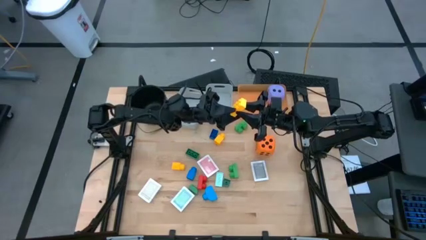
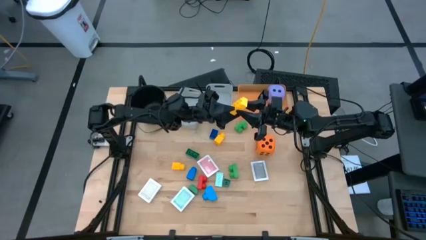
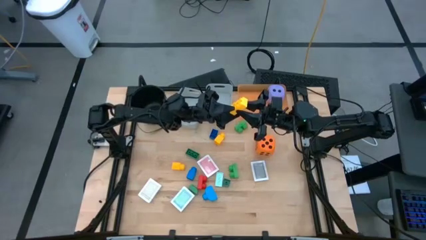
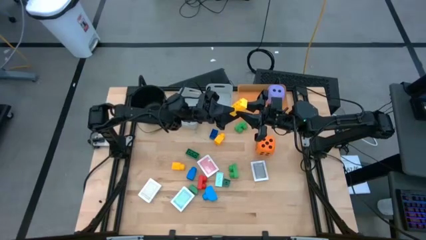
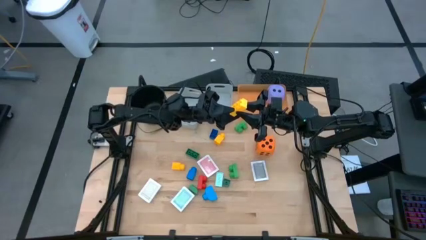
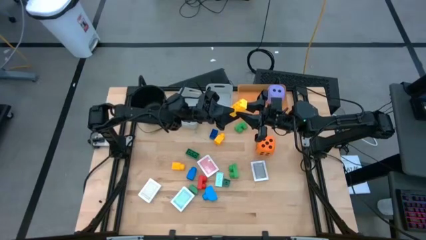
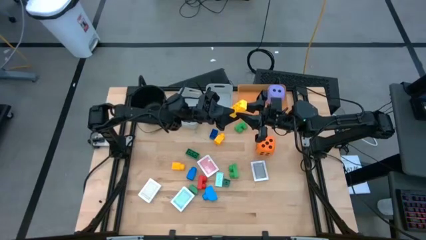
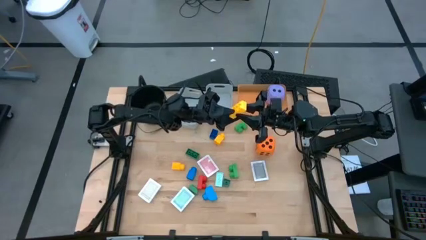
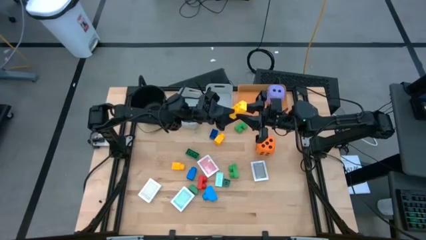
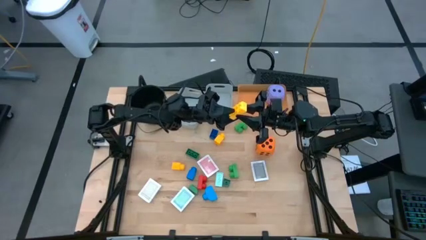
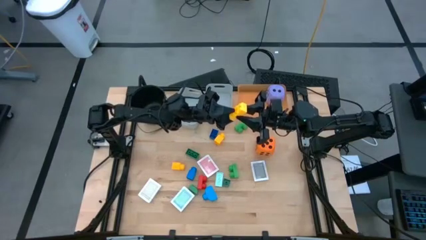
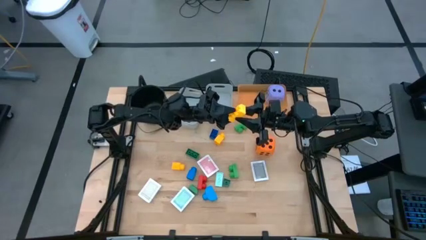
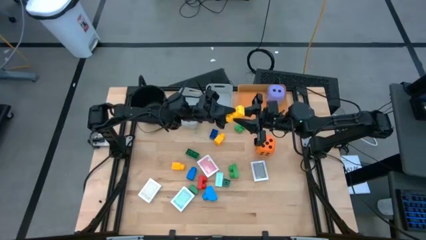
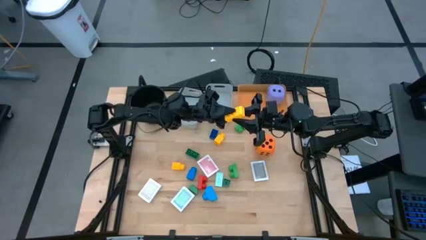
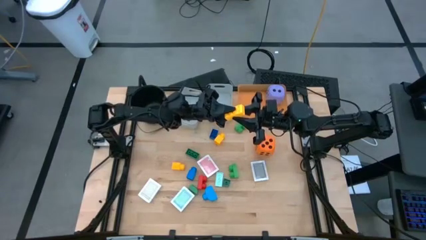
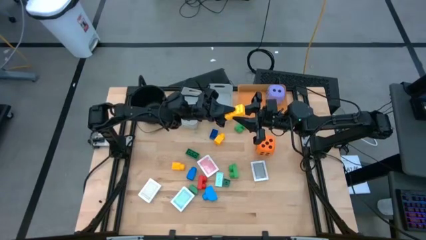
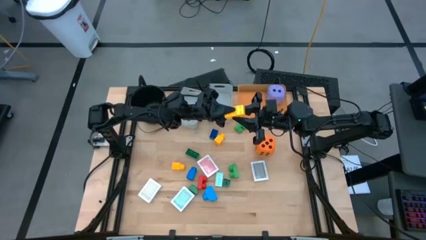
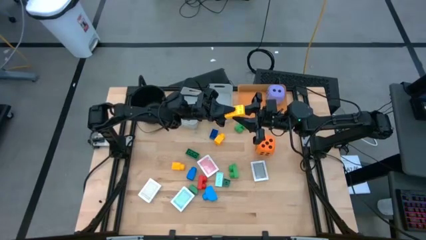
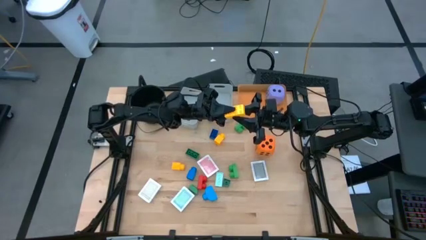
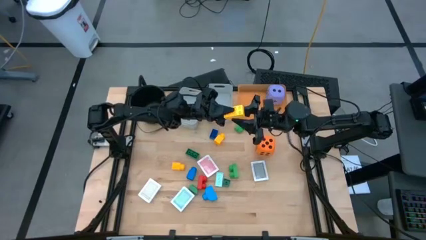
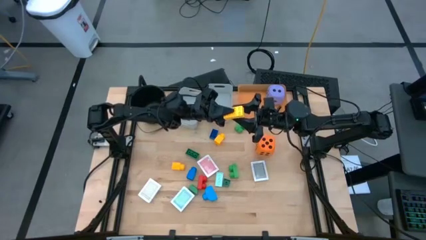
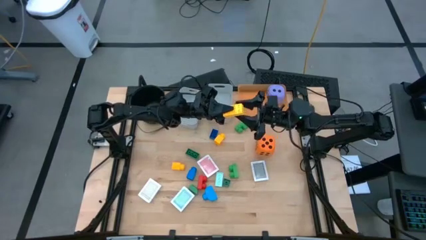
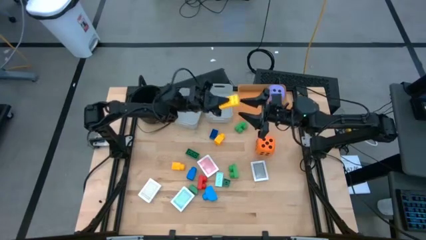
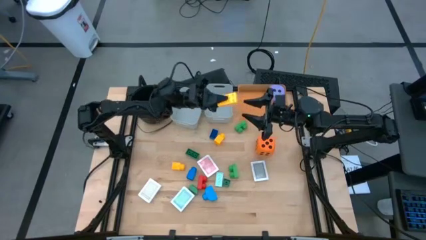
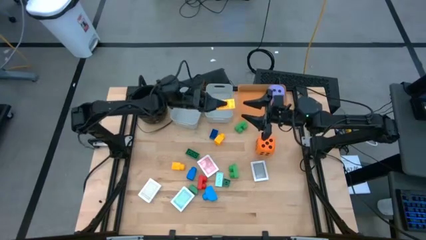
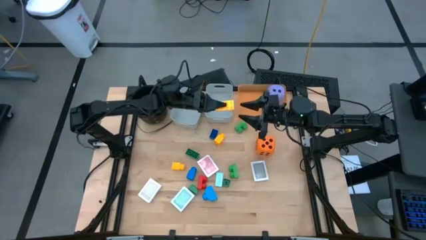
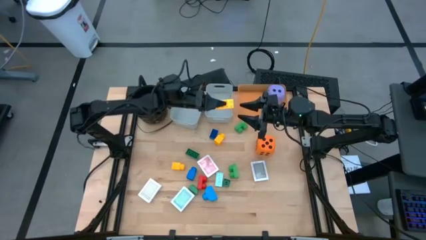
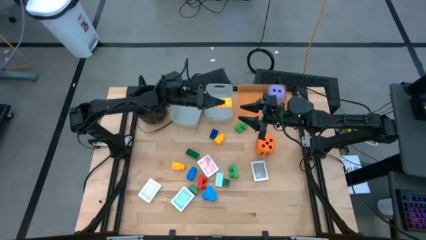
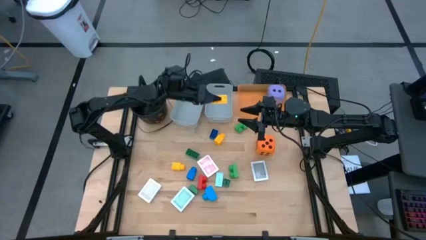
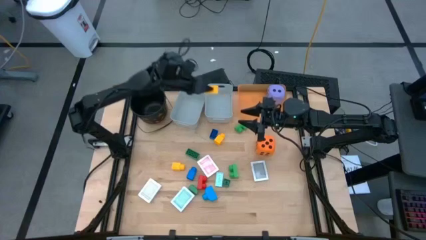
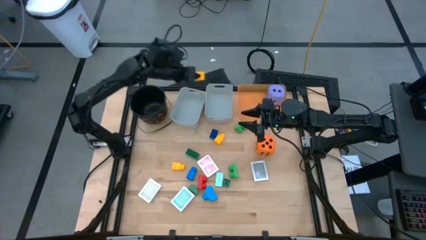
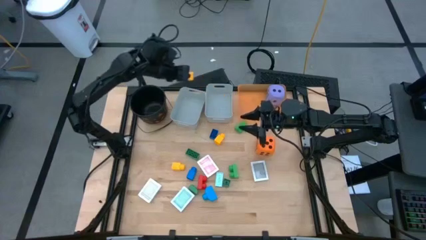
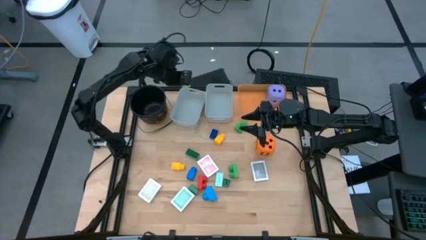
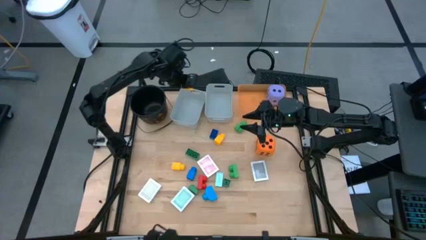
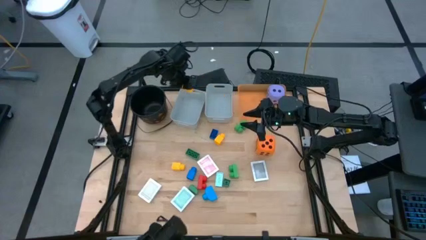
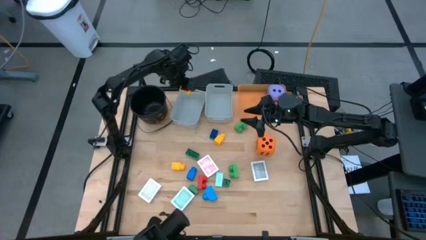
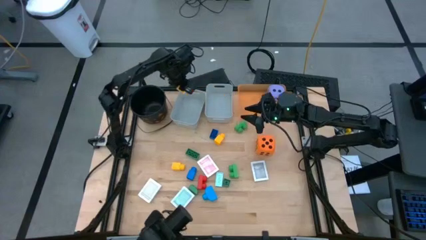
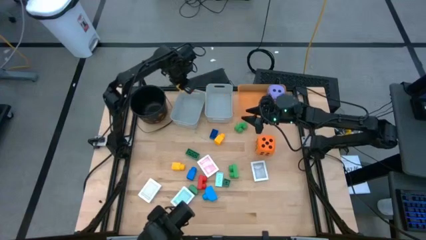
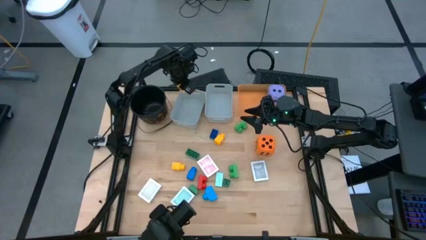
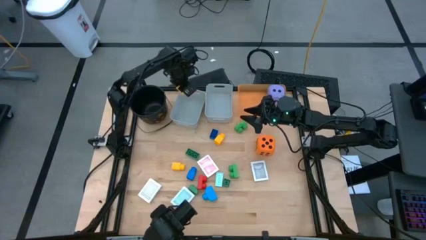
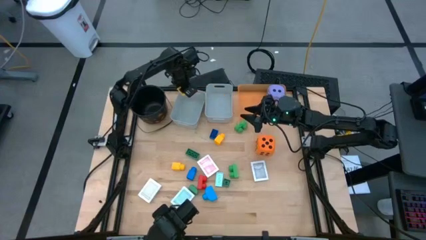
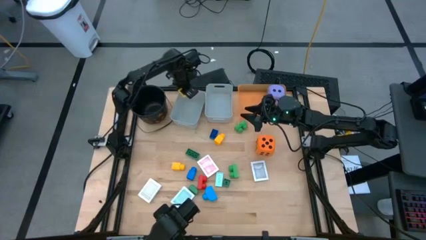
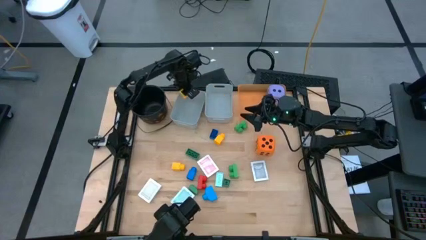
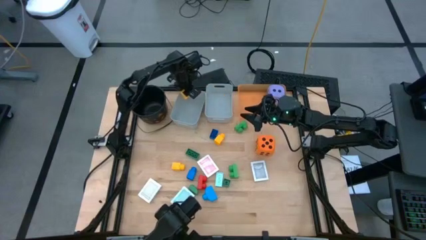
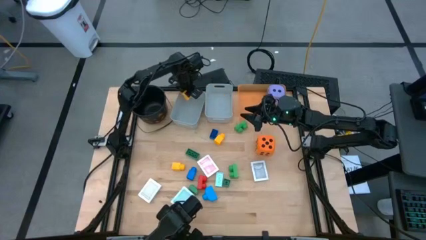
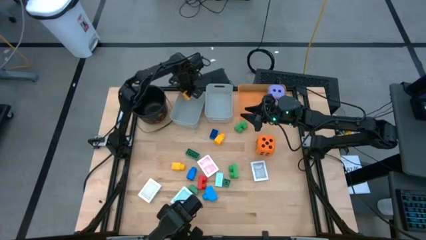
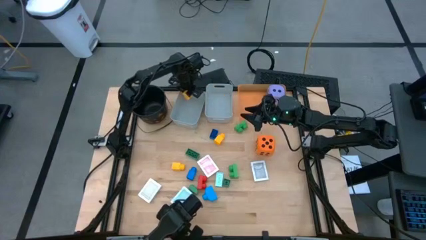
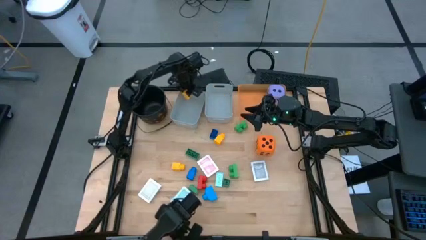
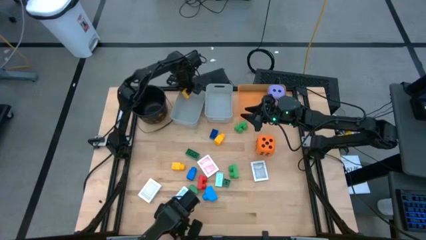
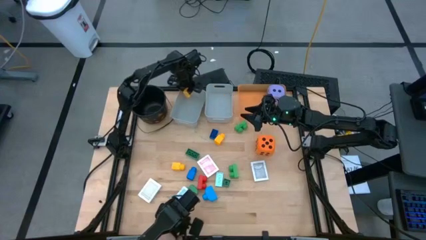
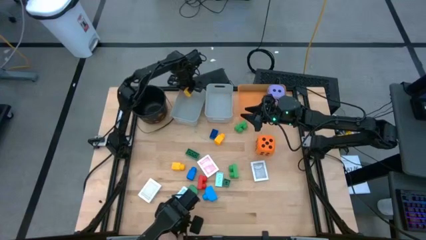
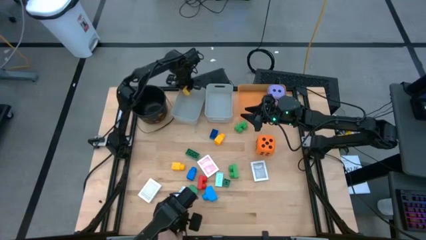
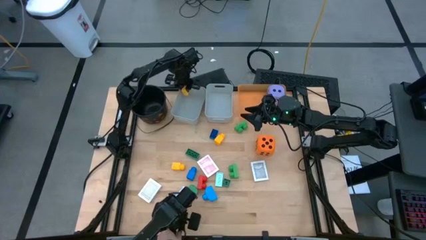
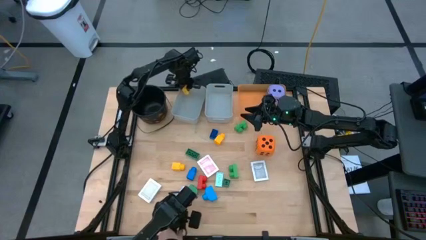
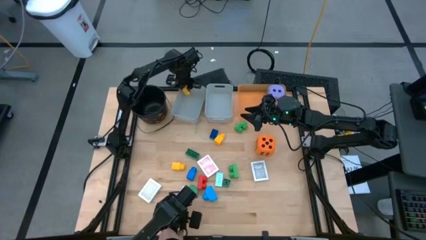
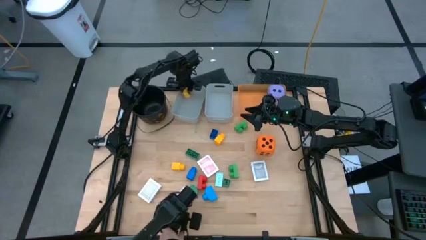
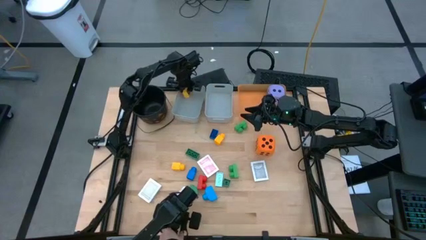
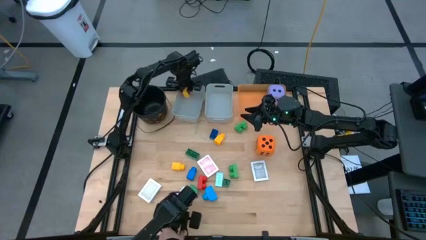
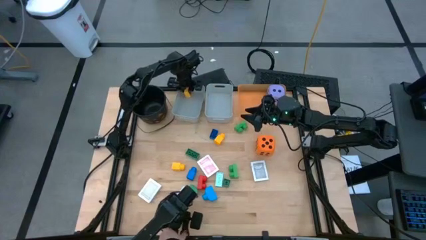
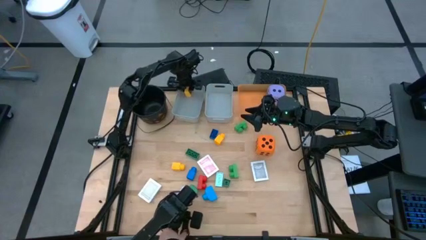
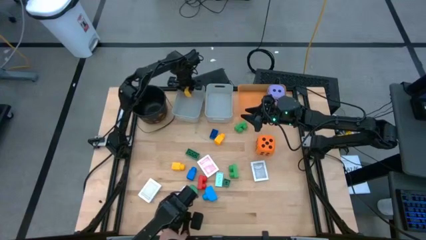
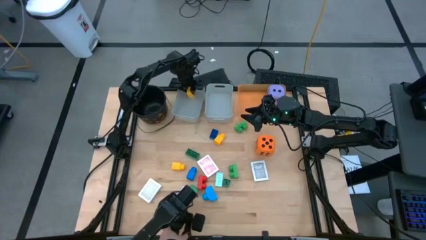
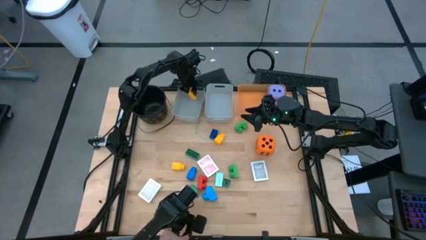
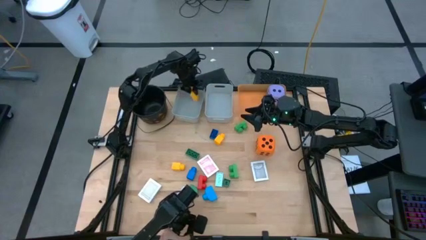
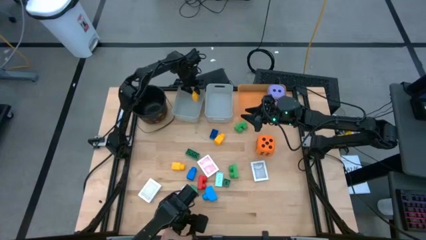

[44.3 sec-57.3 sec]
Task: Pick & Place Toys
Put the yellow game piece into the left gray bin
